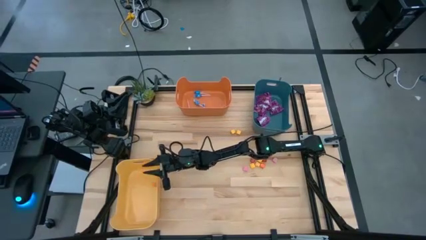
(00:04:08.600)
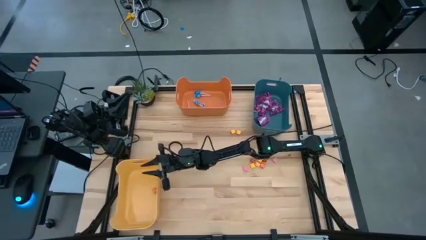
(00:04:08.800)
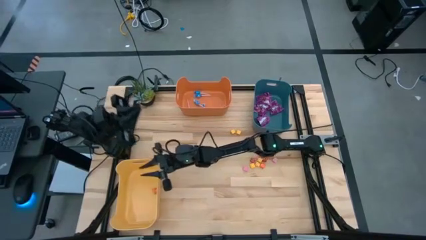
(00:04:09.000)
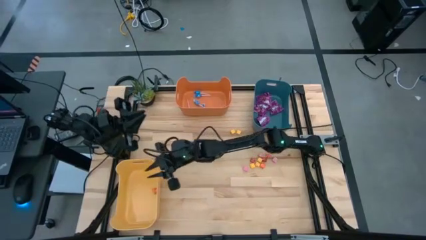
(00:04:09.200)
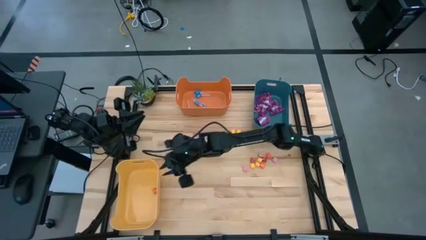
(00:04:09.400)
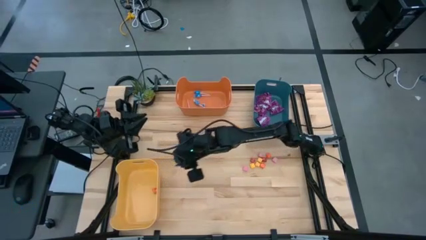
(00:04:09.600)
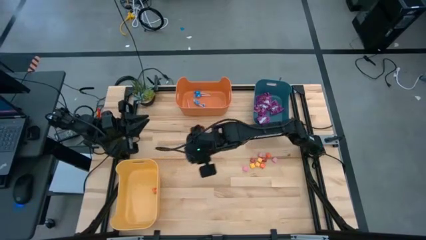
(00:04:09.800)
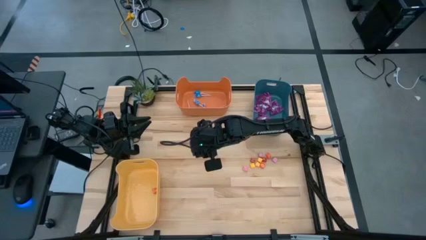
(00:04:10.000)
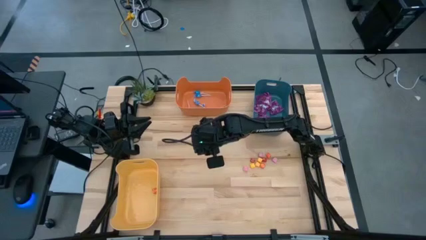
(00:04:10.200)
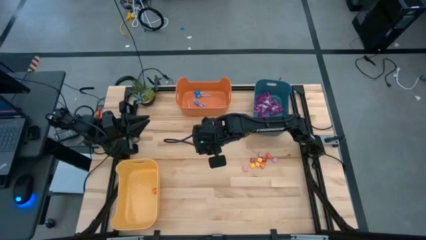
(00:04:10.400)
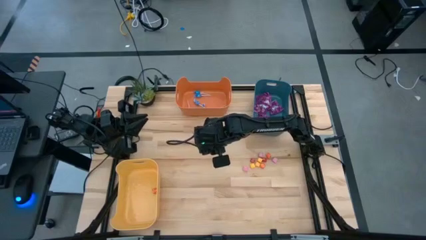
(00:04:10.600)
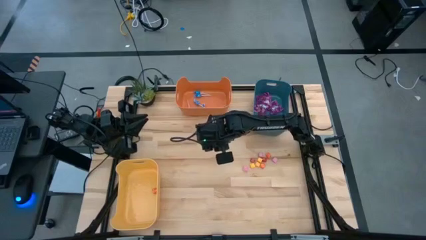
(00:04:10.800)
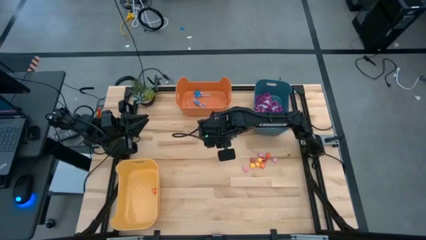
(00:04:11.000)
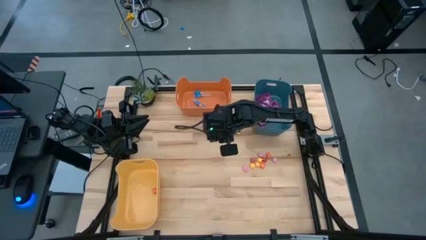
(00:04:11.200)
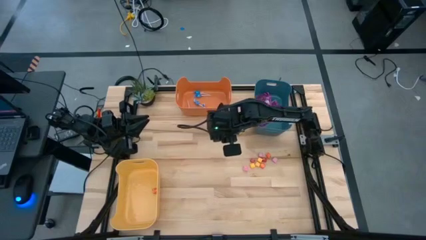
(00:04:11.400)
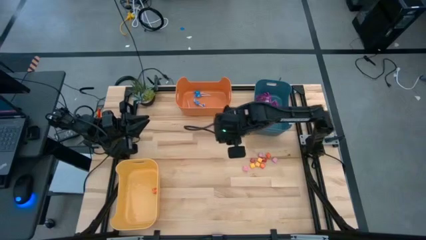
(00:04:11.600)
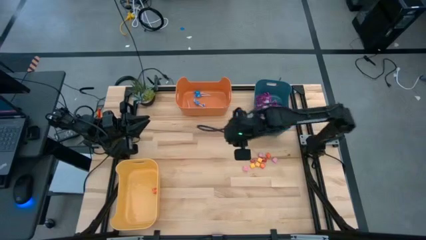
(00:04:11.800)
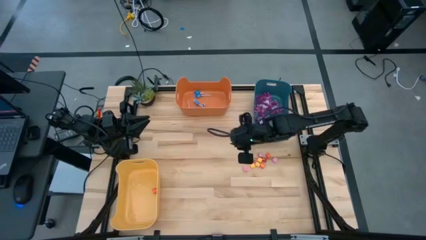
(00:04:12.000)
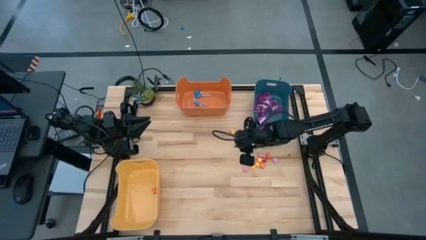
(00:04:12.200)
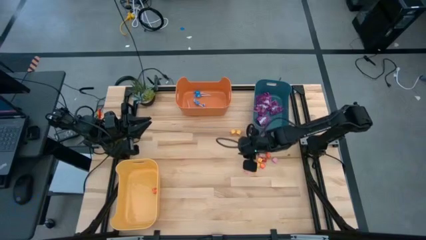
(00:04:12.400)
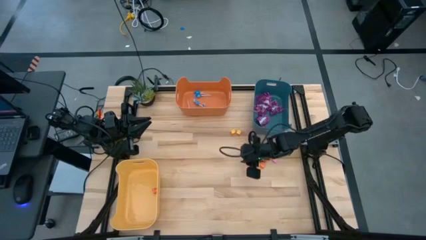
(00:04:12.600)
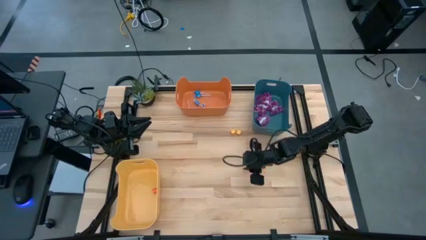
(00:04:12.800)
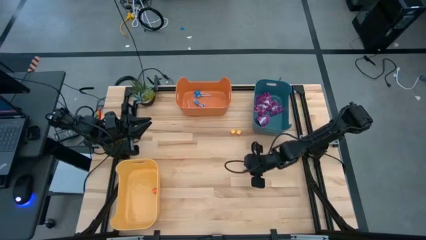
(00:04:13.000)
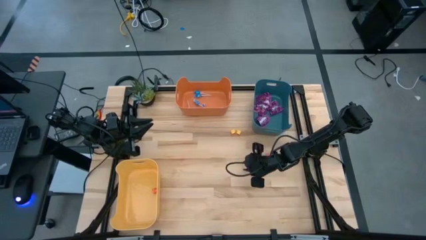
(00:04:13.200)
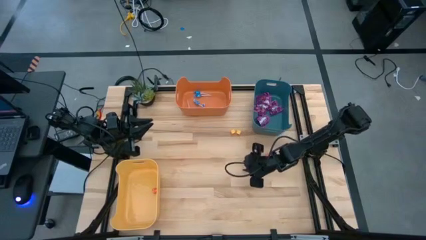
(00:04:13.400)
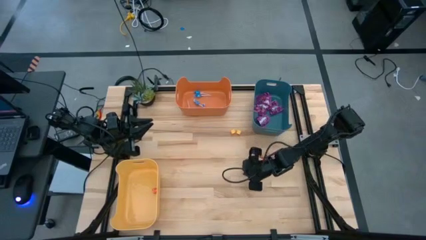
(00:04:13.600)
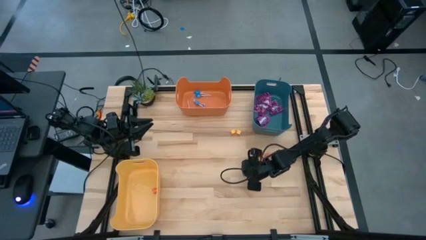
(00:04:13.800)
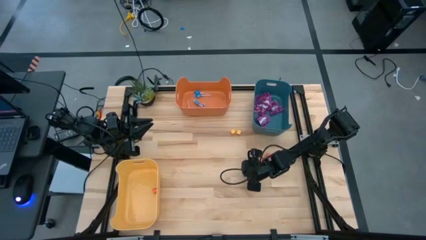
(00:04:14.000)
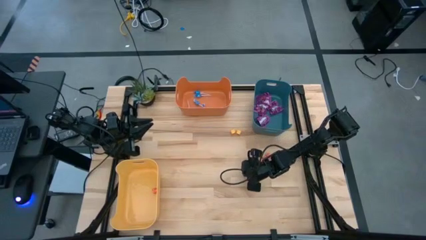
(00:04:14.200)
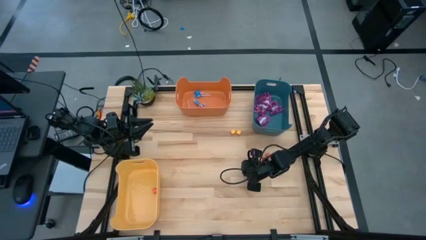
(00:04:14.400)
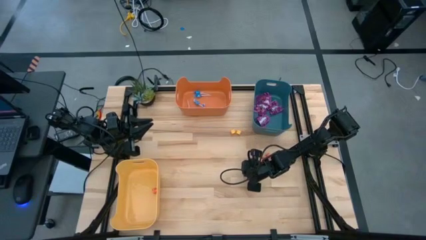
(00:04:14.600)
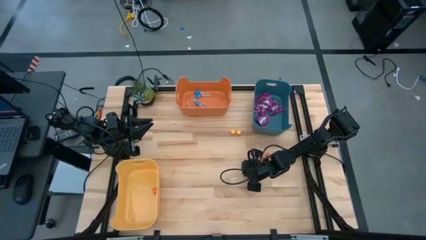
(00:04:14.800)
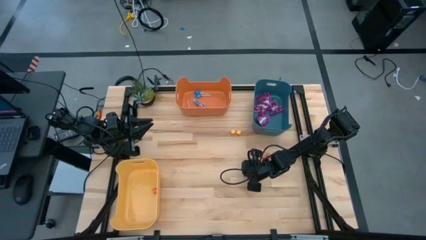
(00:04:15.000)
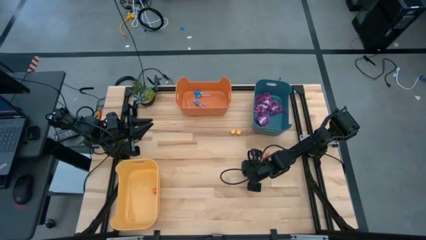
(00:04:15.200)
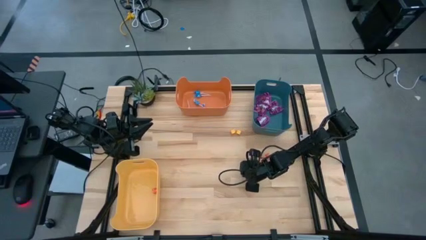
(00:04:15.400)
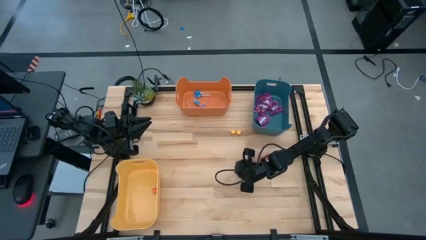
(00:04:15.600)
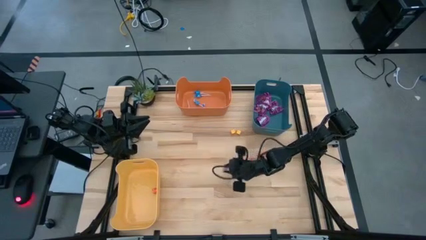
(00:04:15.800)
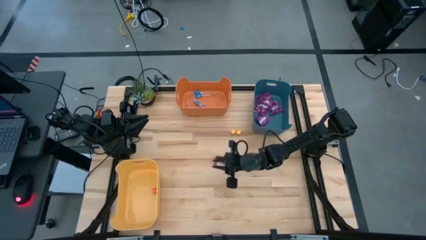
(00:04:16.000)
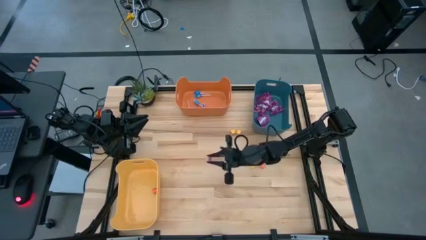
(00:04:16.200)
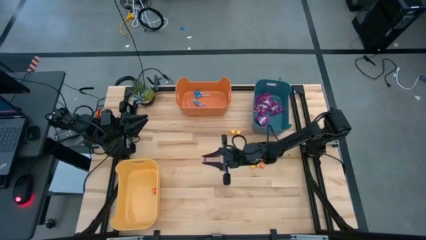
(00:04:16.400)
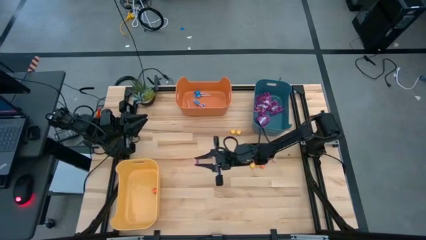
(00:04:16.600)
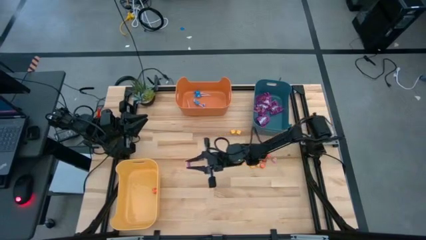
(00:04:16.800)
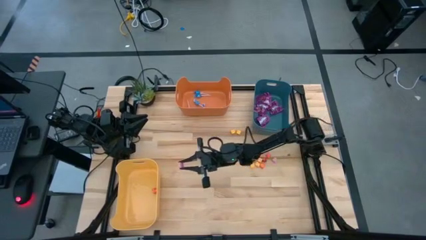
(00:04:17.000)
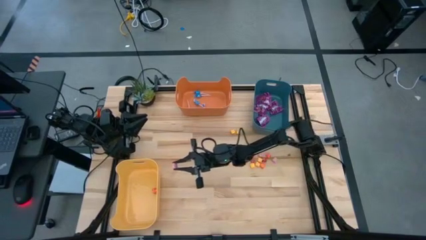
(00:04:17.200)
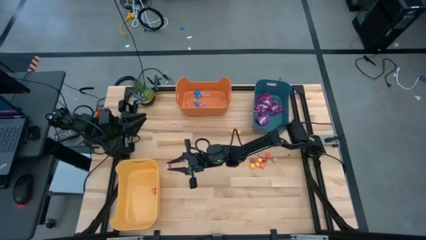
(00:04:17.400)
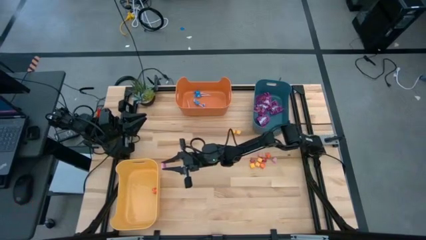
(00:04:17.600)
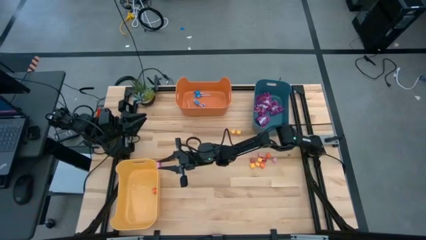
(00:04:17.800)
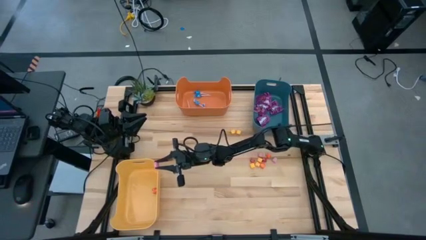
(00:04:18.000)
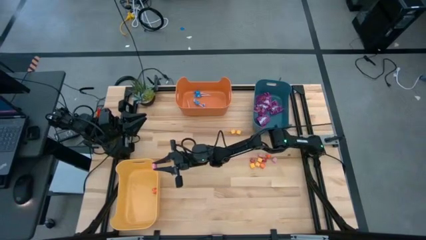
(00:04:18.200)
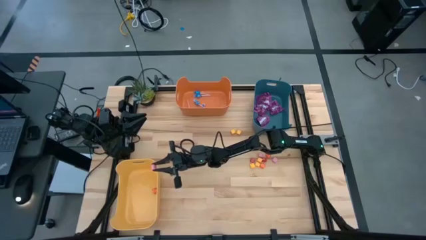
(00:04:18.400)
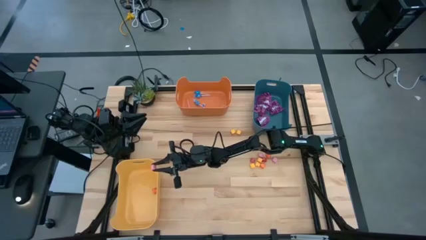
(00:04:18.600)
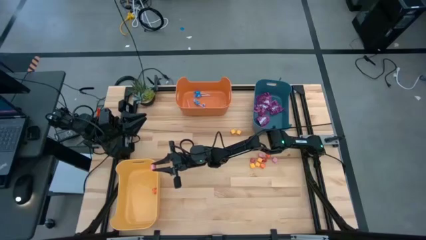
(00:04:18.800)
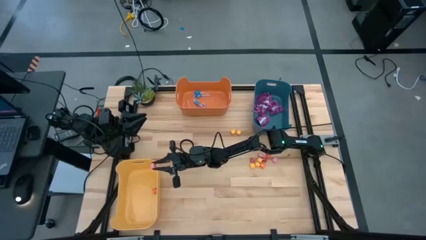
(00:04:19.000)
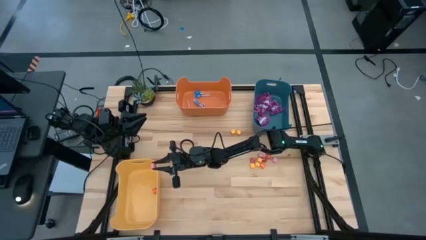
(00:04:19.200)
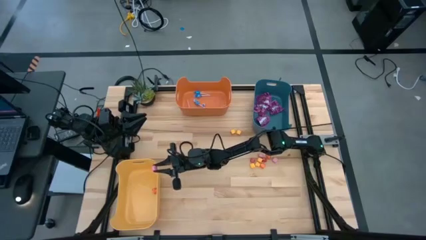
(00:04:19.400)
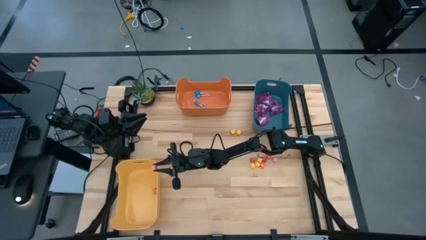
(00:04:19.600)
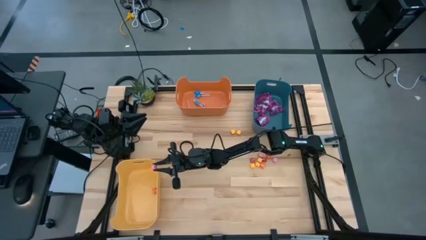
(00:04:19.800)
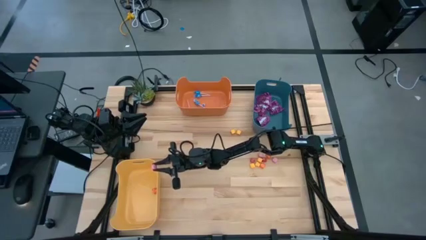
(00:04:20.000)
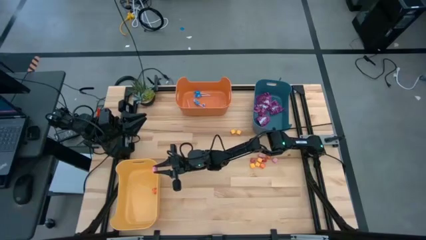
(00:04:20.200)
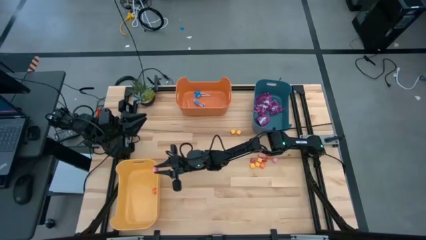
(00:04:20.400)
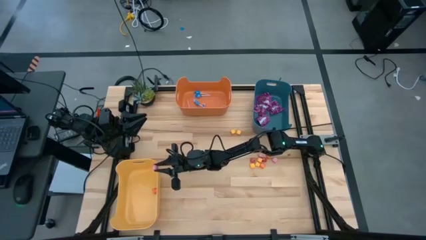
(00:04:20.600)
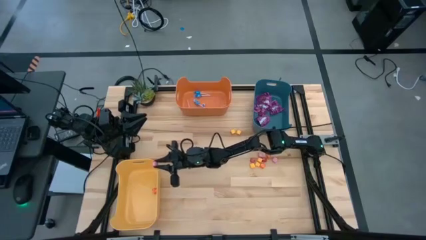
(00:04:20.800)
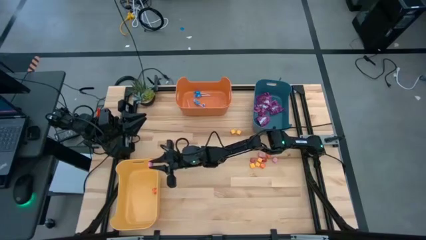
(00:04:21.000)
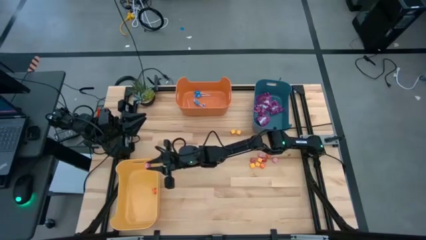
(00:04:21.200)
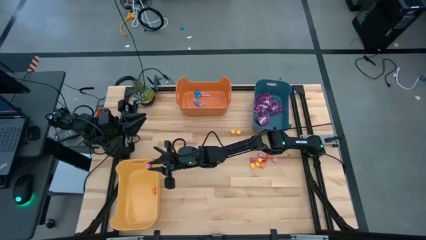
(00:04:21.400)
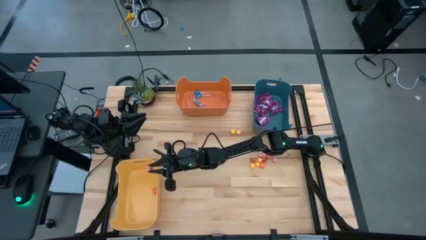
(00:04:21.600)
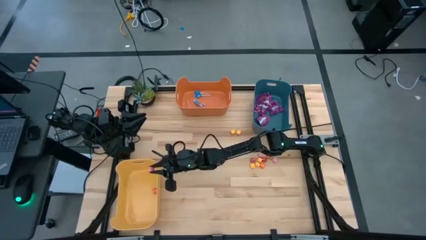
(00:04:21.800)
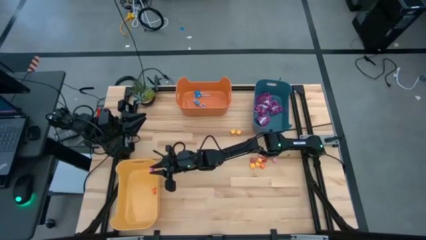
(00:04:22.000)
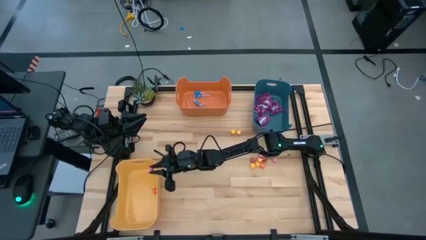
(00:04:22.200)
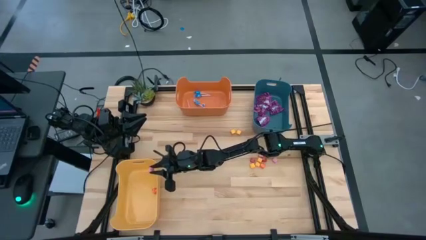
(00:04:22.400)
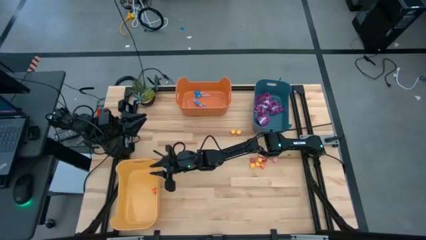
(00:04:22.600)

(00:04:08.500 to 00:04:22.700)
Task: Sort candy
Put the left pink candy into the yellow bin
